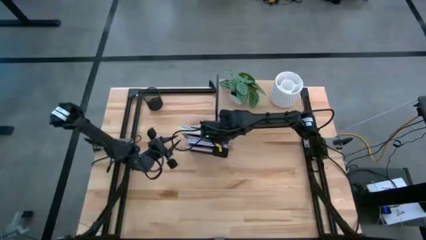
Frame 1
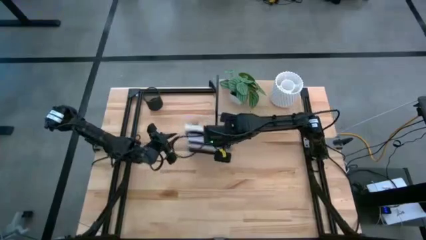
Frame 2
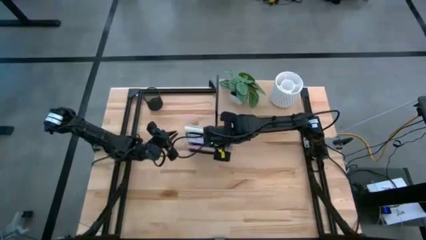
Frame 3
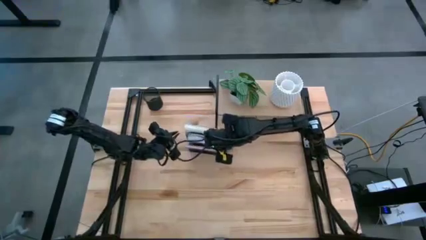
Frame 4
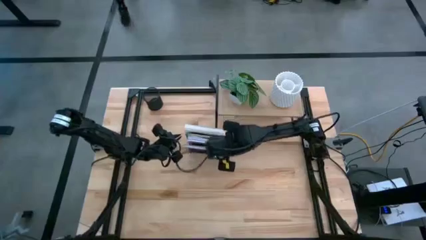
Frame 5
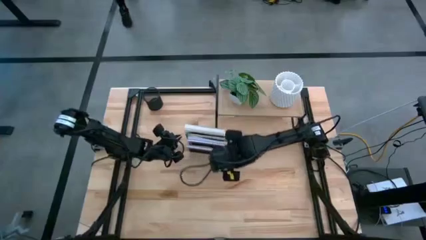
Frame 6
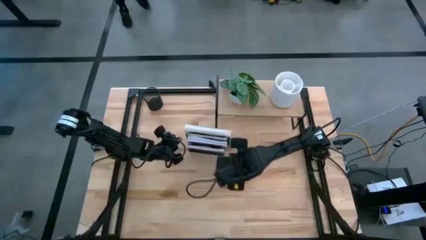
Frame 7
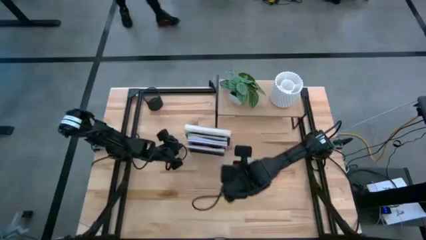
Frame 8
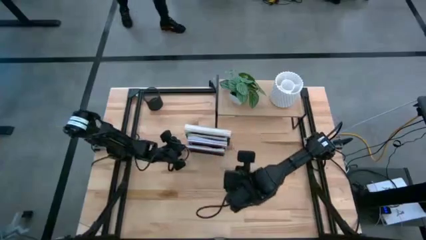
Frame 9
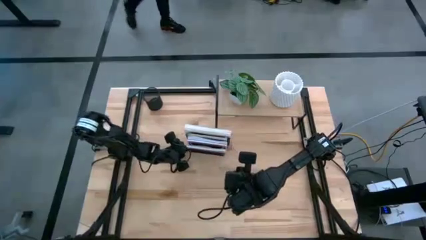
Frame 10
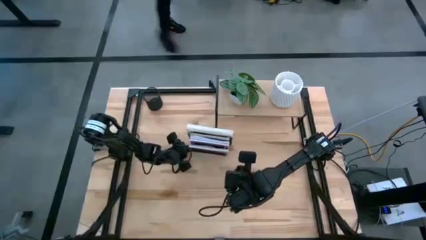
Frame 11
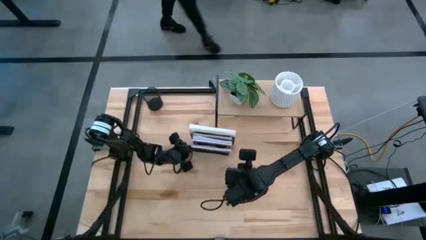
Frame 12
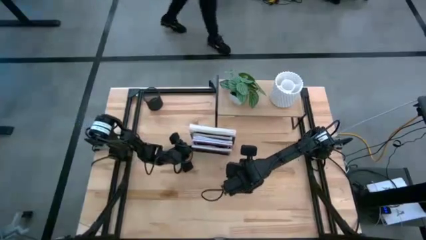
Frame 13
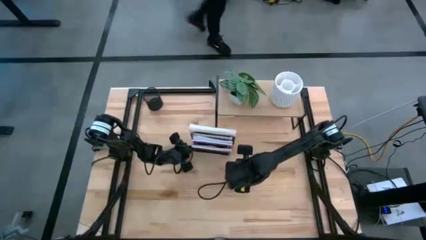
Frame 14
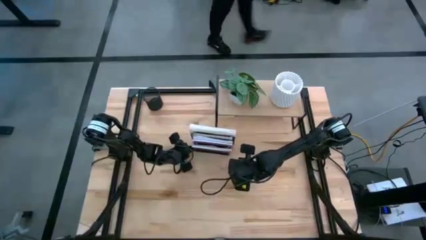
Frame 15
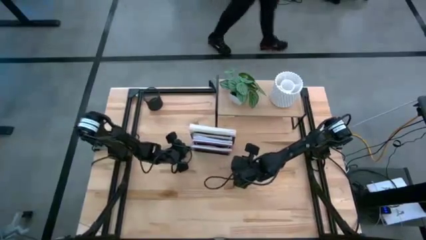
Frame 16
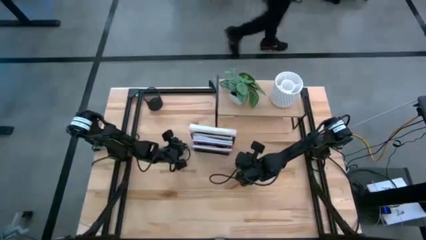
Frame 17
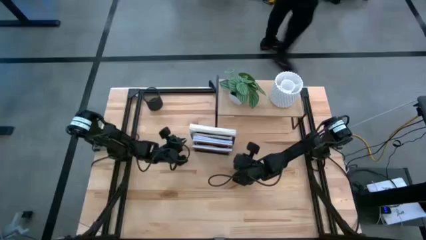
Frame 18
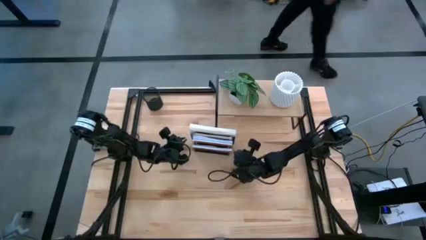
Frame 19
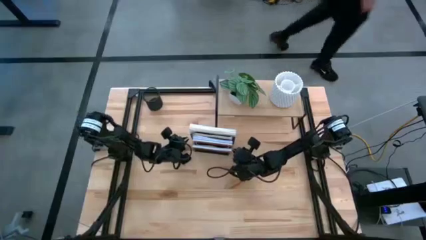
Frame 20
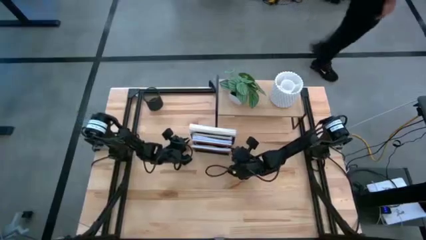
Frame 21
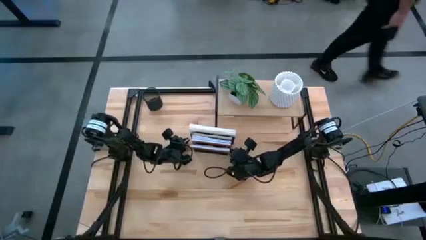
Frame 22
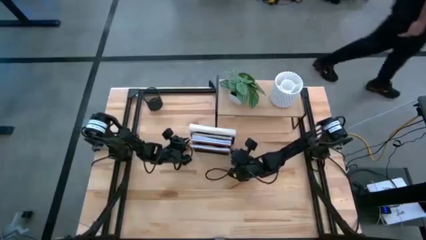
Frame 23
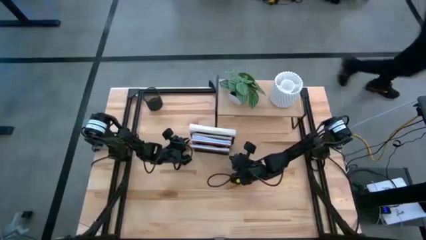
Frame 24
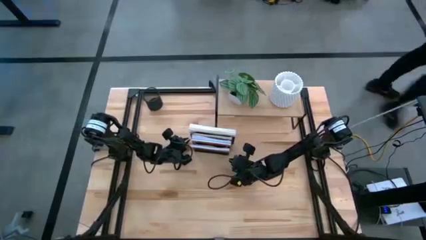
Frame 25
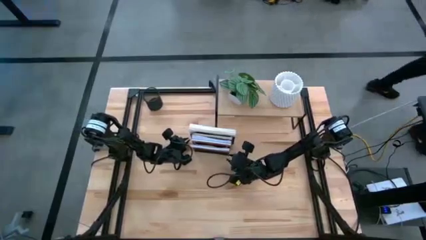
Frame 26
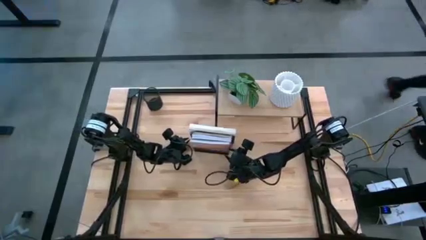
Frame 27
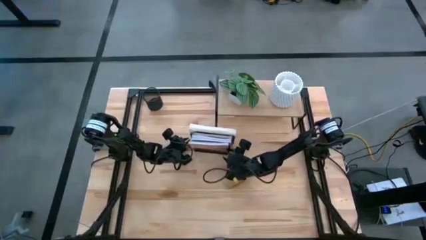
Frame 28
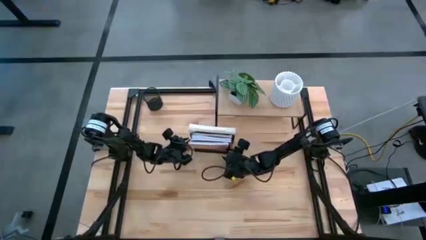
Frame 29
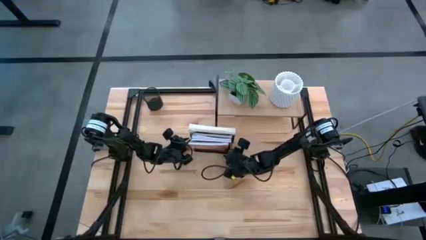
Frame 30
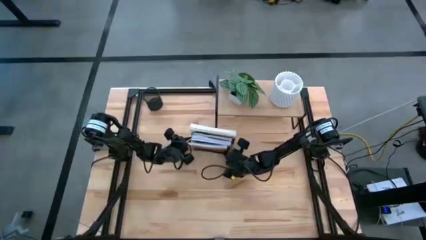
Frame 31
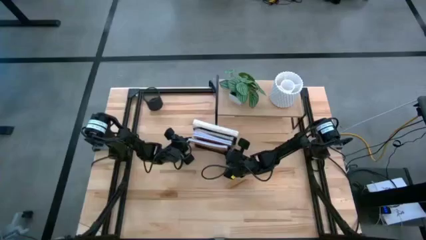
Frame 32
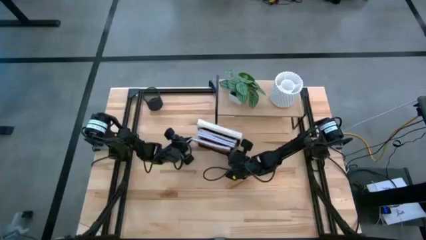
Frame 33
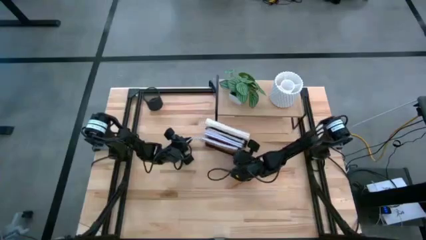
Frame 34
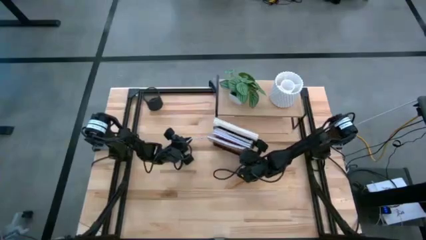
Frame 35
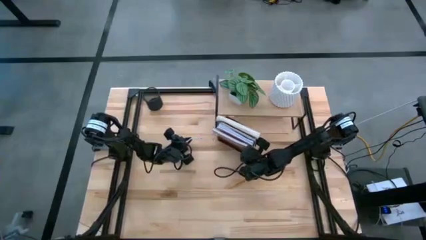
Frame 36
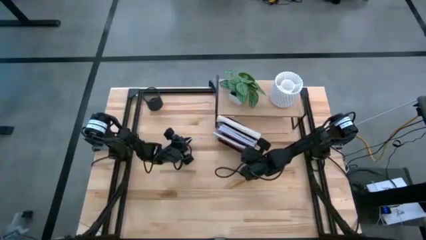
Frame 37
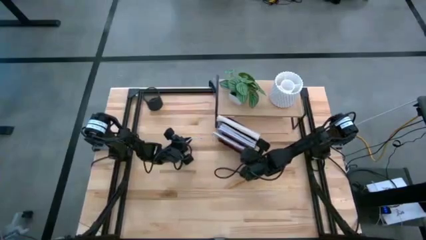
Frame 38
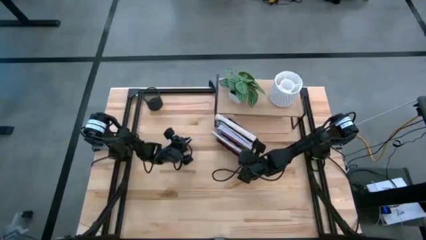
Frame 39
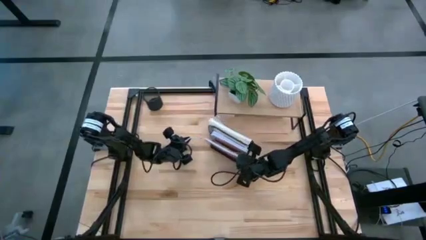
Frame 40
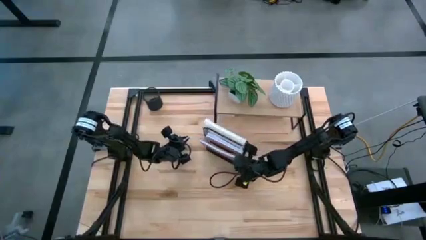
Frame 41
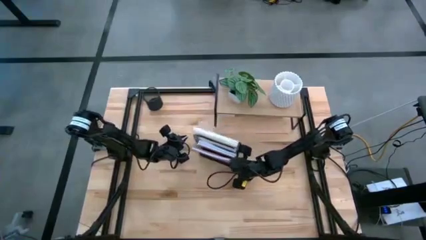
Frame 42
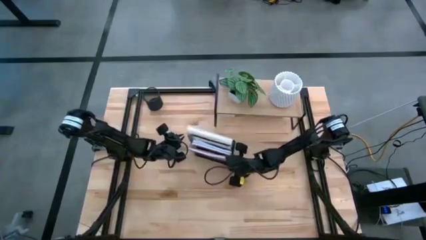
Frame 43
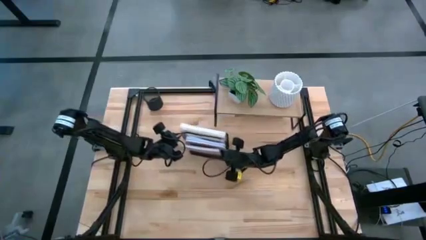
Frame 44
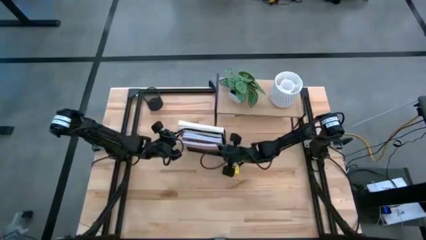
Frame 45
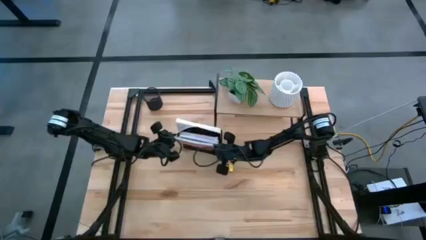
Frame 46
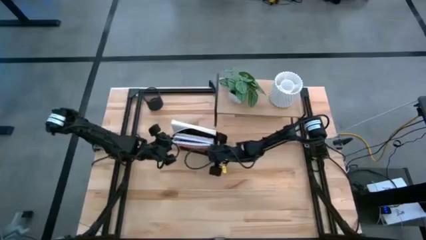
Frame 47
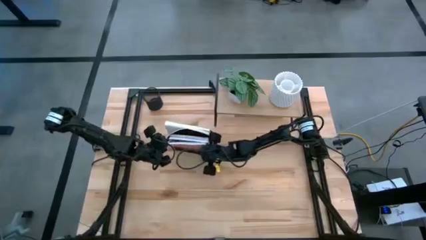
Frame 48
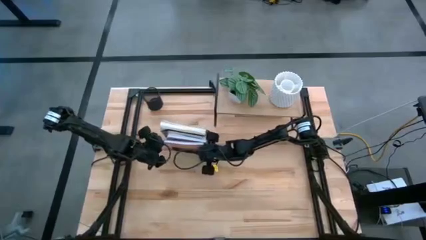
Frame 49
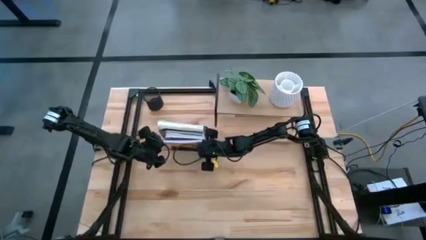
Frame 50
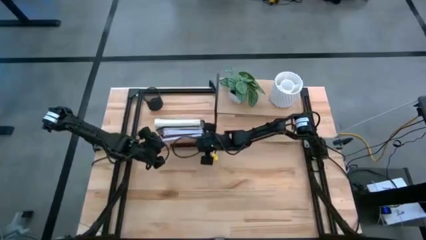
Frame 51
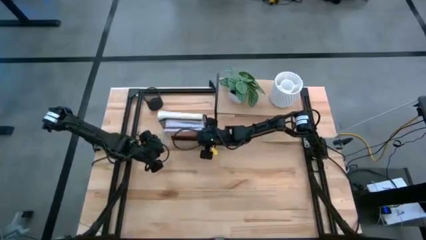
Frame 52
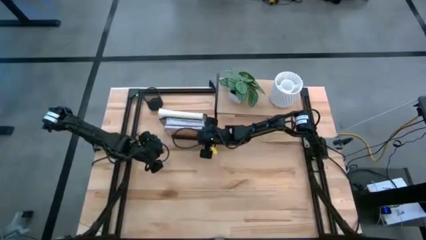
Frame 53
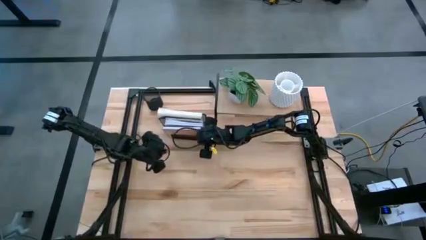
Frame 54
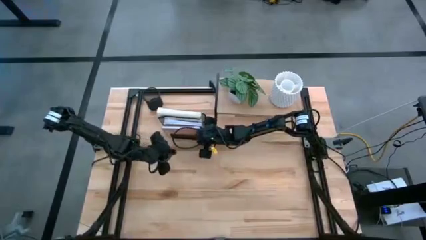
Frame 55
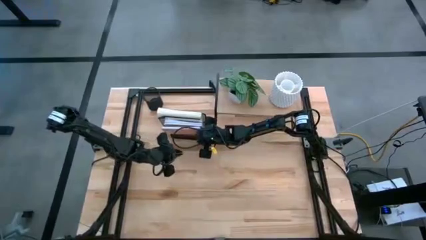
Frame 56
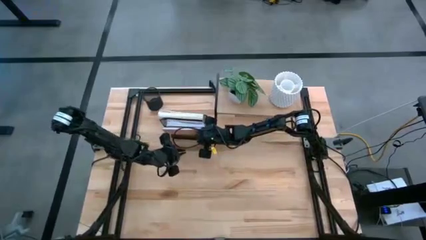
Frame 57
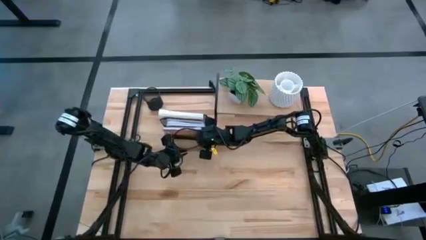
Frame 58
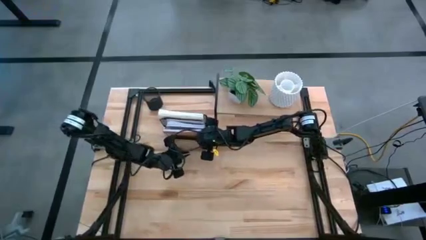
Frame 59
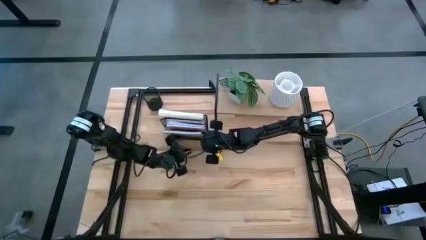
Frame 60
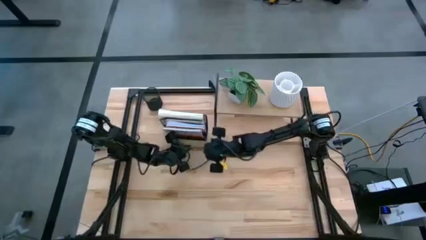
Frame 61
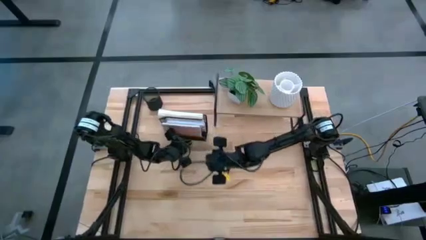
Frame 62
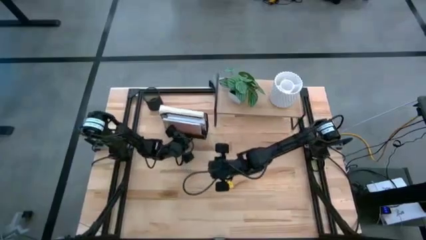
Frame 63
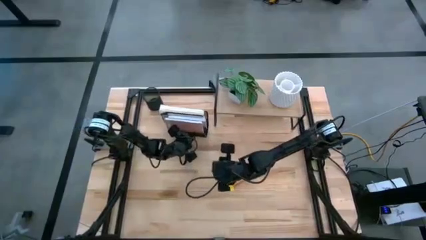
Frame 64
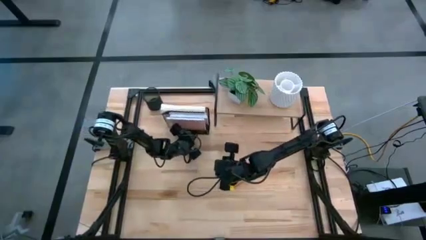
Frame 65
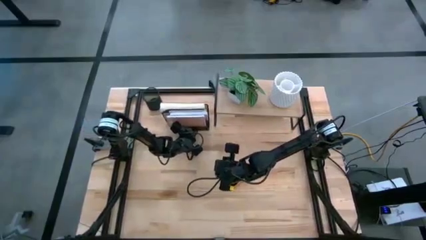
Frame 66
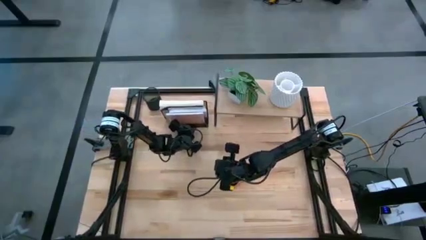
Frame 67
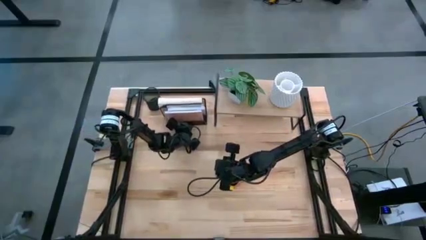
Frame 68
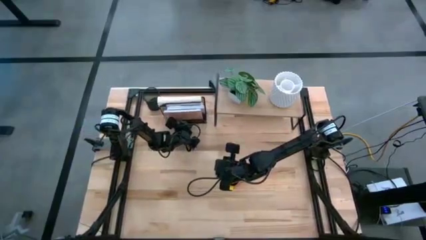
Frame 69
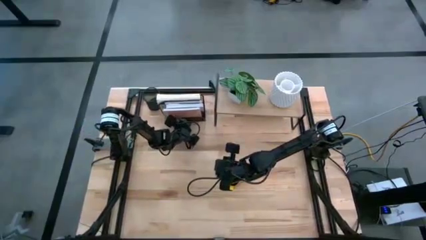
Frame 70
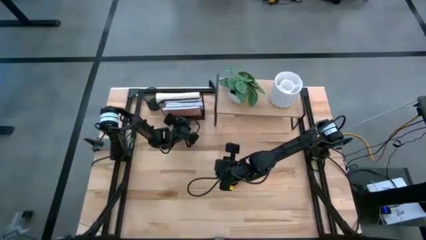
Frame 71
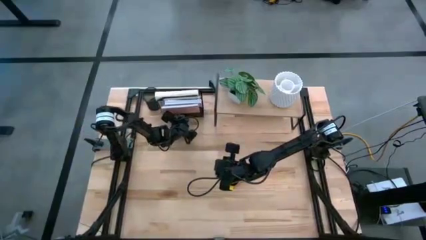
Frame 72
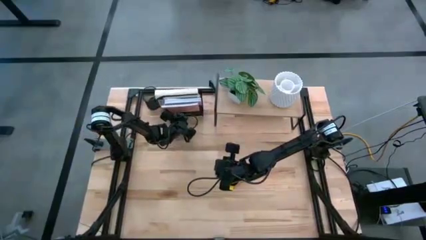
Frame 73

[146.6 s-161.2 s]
Task: Stock shelves
Move the black mesh bookshelf to the top left of the table
